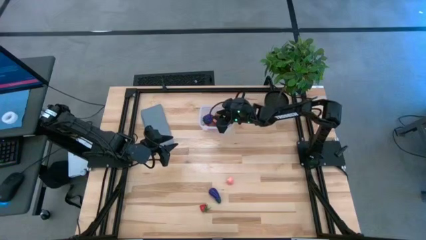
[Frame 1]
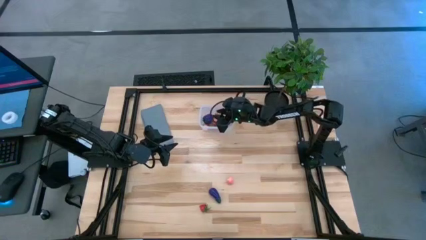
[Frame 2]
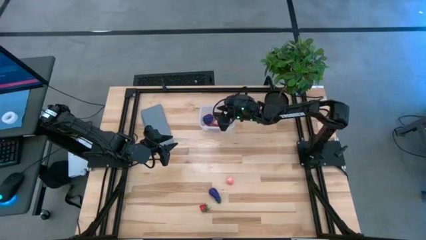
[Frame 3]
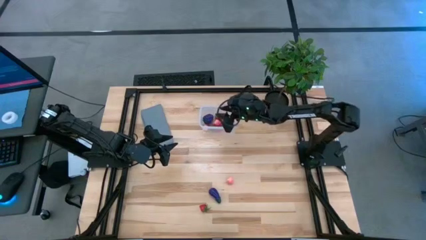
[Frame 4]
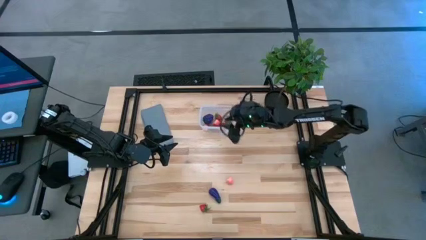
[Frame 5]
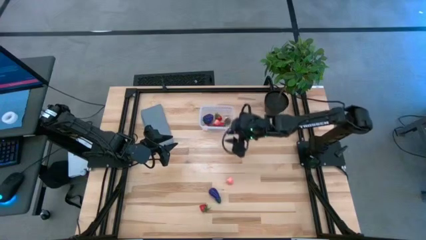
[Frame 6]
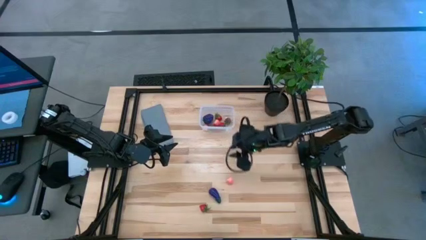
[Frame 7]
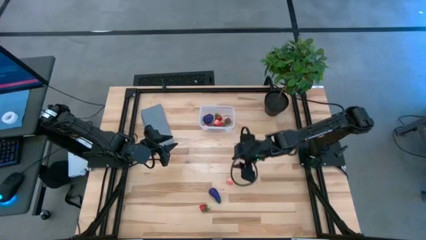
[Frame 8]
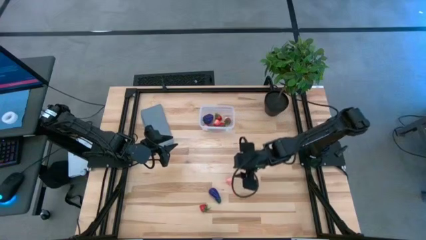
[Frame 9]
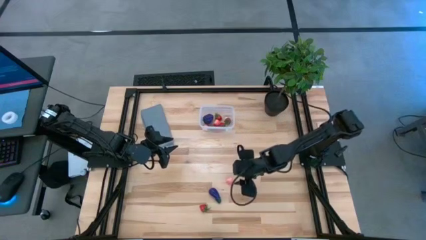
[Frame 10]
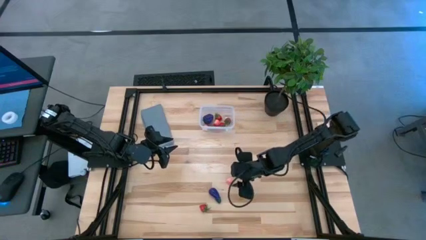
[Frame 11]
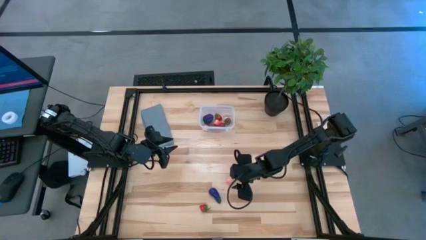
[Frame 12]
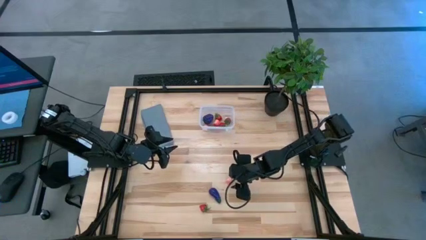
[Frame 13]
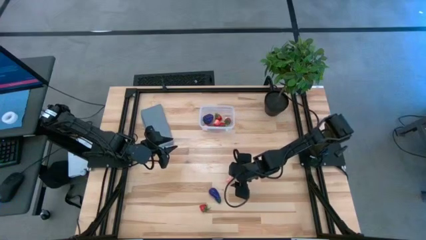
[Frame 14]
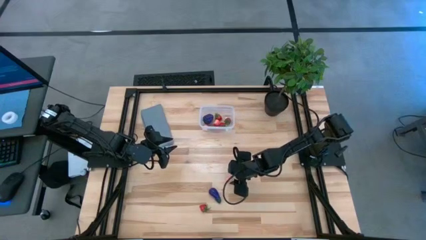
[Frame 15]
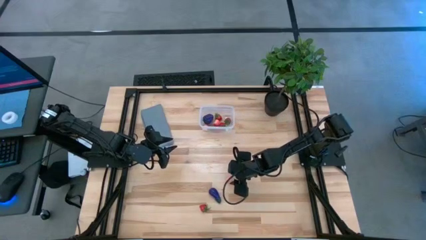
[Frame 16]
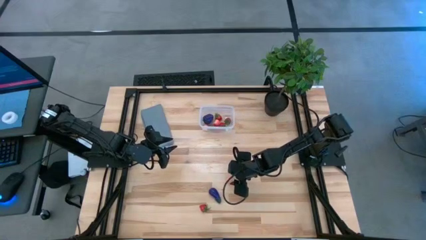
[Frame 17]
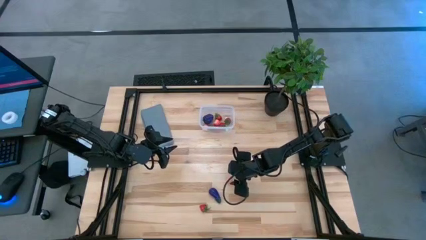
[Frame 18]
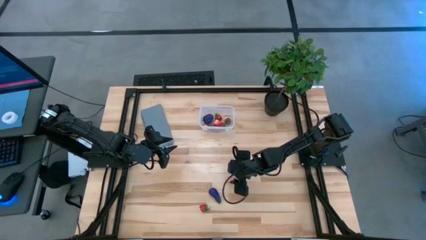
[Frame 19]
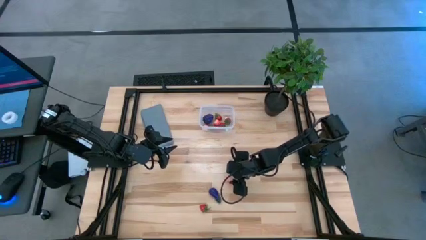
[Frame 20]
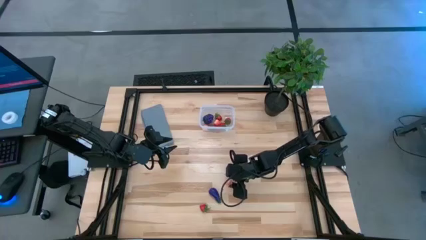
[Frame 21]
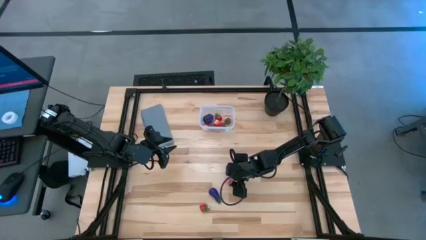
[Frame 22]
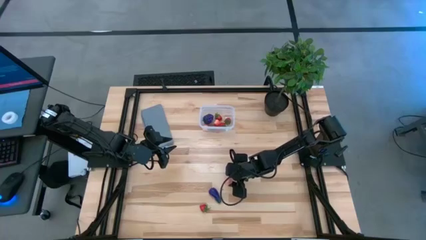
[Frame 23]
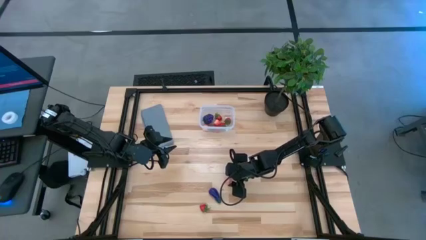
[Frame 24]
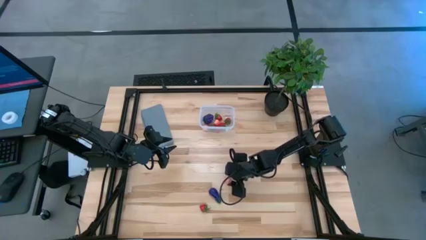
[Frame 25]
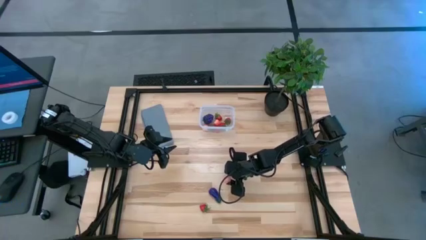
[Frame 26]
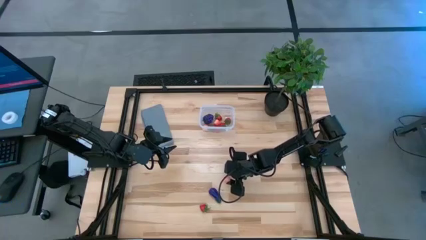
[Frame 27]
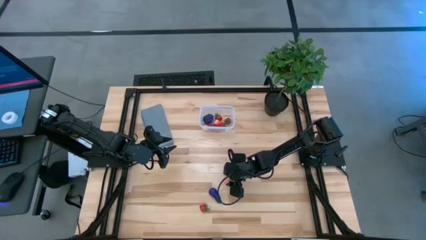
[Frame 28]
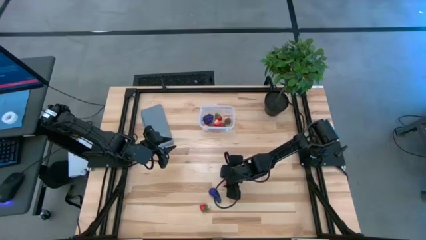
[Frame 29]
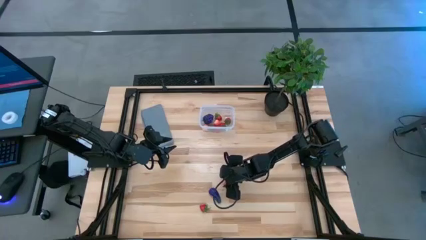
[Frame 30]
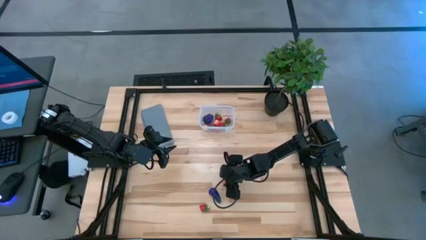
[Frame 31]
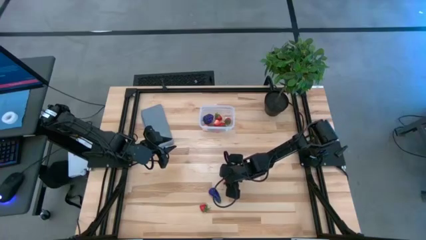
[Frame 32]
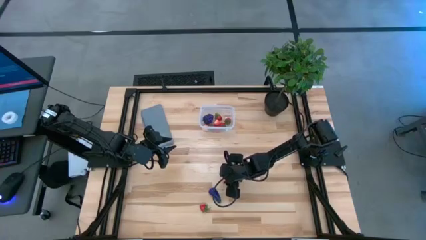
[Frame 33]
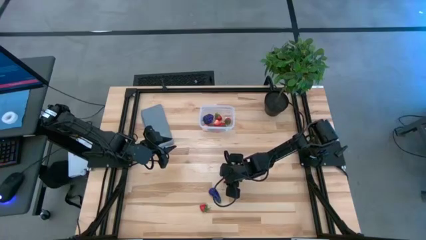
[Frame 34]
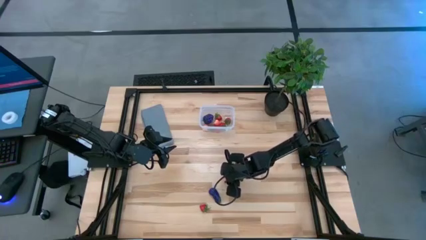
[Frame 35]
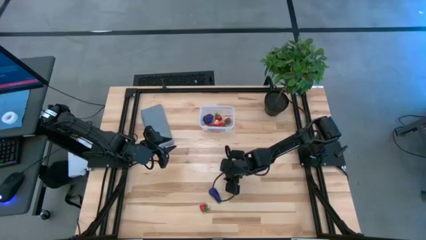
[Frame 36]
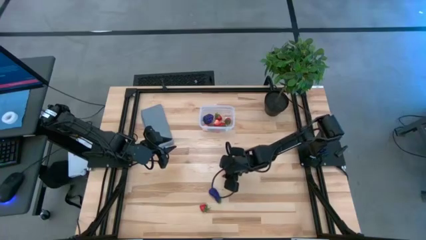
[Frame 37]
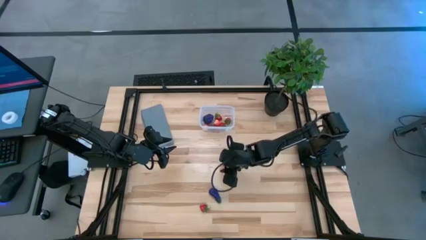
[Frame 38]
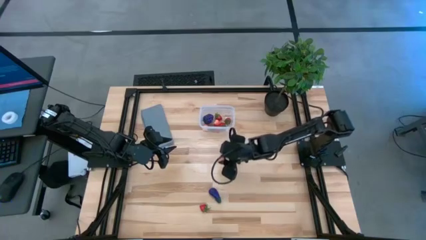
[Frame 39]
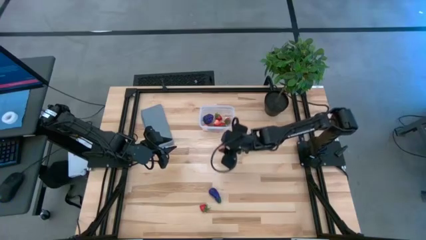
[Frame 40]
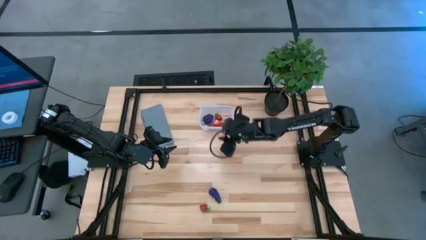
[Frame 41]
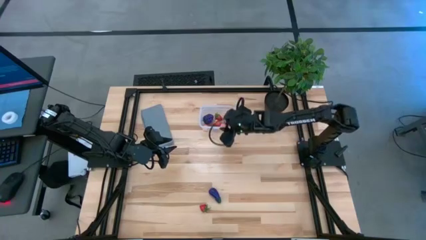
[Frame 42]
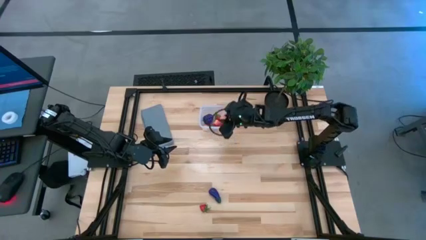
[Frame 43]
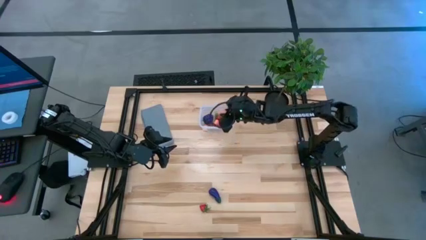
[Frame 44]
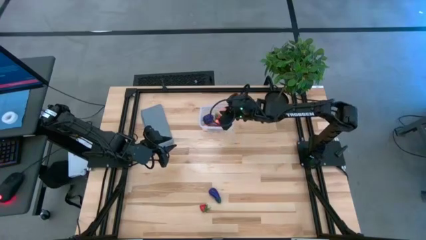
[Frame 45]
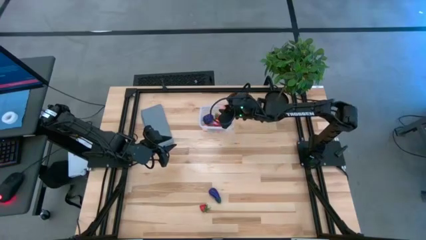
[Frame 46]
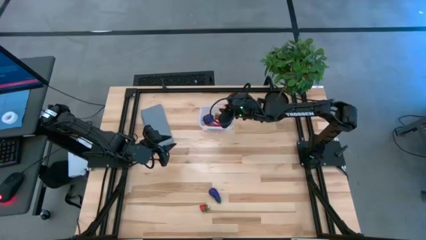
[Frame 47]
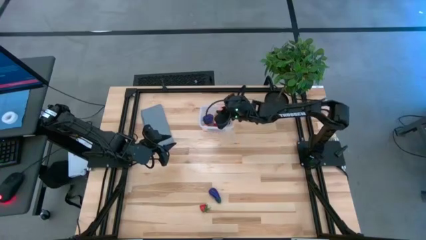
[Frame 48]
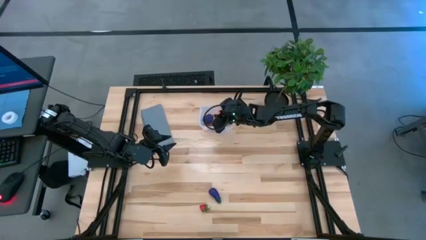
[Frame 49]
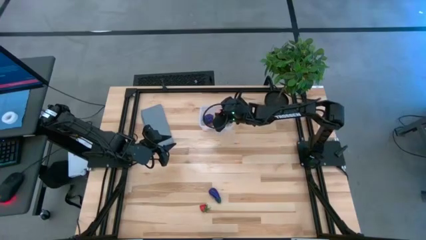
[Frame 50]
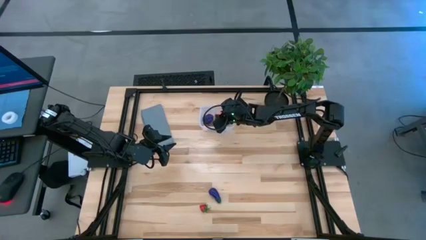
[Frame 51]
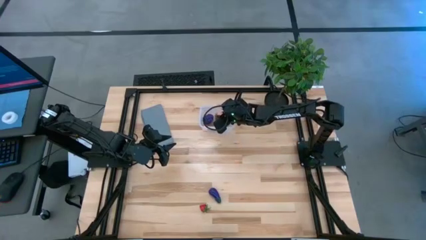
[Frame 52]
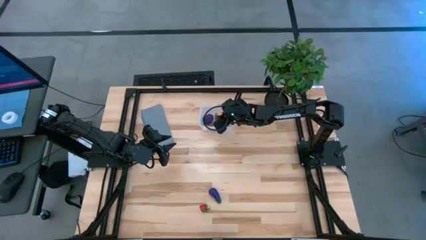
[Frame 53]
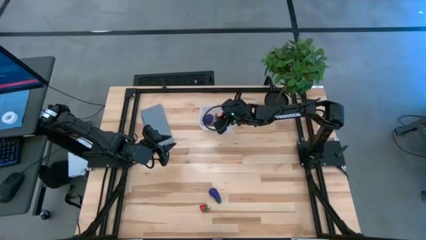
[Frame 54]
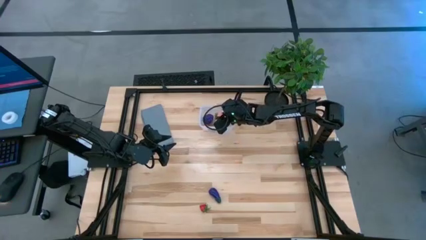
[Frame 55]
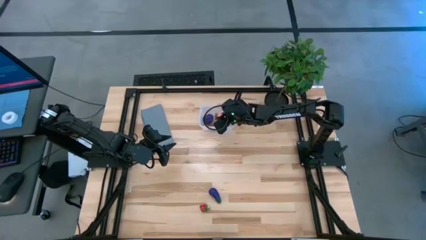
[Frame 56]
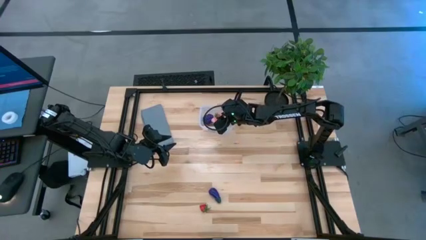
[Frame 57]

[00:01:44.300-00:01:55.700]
Task: Pick and placing Produce into tupperware
Put the peach into the transparent bin

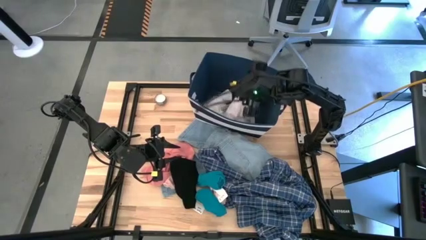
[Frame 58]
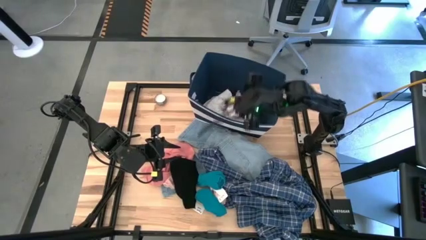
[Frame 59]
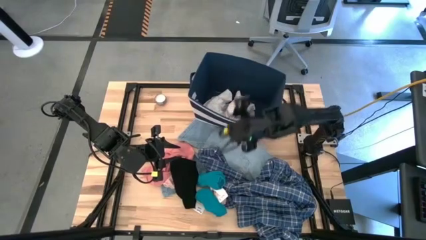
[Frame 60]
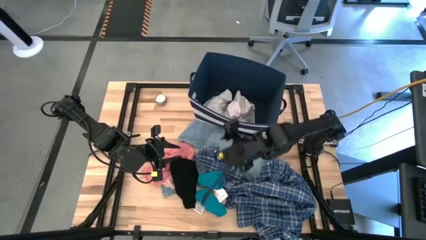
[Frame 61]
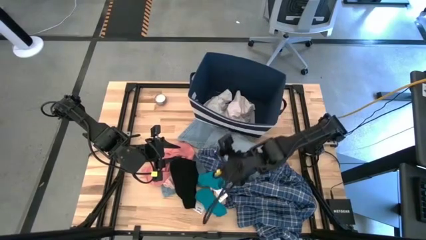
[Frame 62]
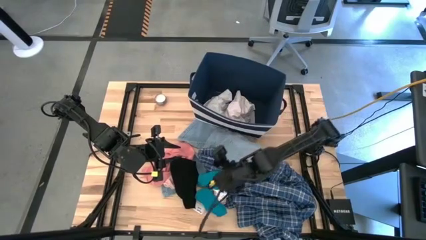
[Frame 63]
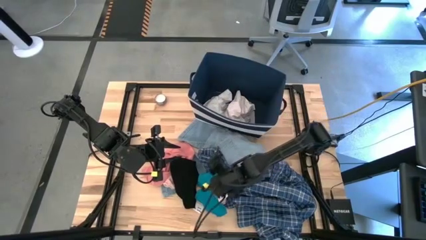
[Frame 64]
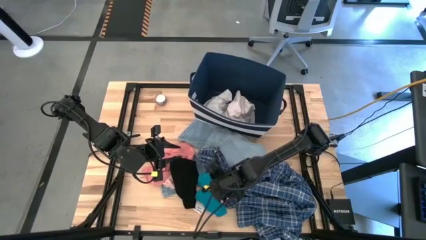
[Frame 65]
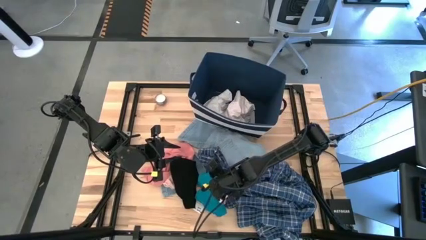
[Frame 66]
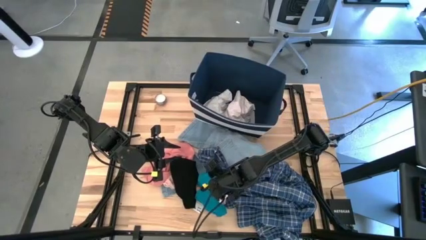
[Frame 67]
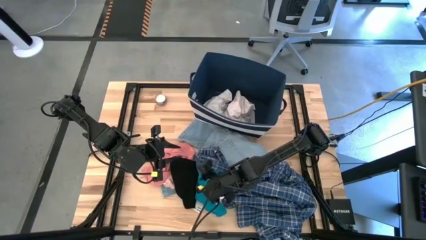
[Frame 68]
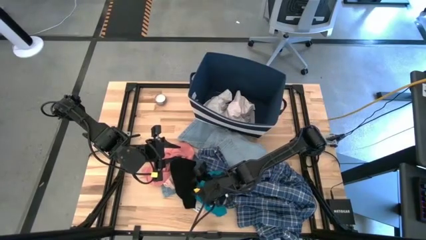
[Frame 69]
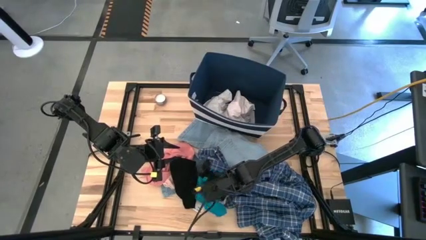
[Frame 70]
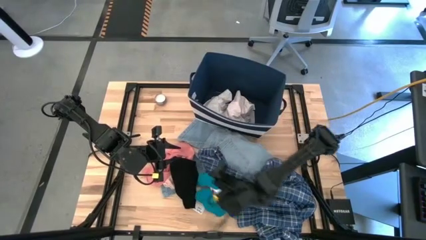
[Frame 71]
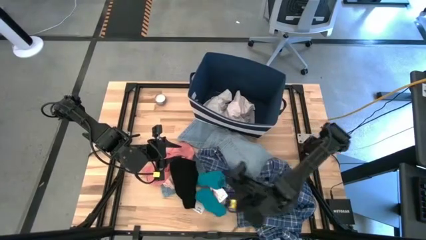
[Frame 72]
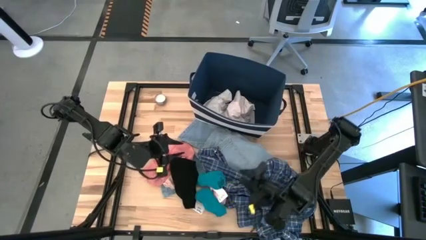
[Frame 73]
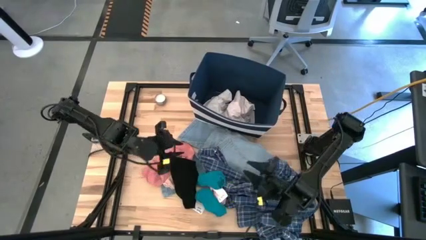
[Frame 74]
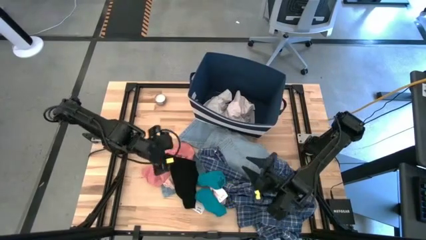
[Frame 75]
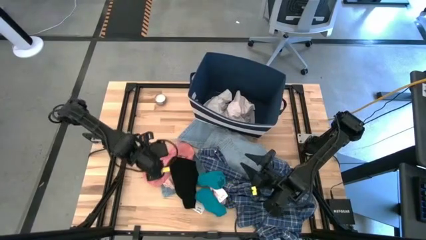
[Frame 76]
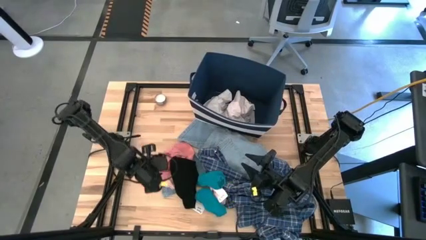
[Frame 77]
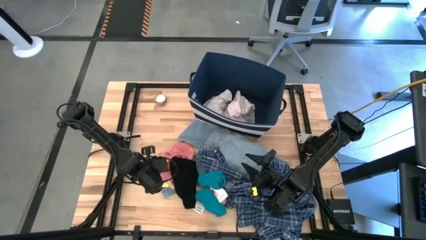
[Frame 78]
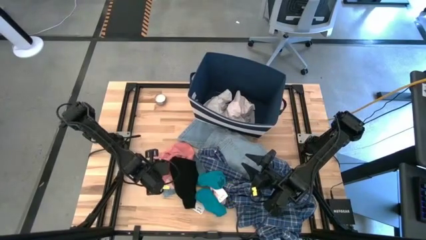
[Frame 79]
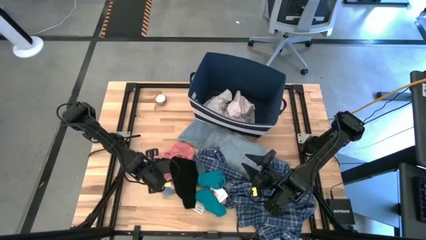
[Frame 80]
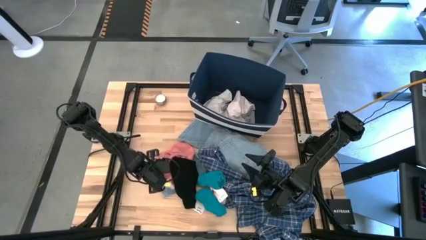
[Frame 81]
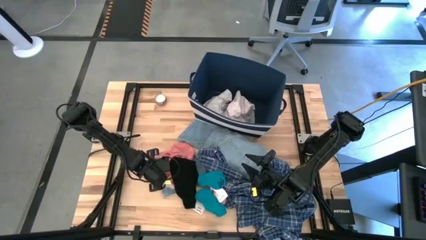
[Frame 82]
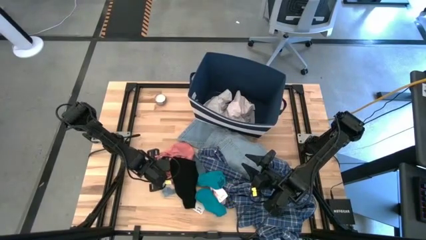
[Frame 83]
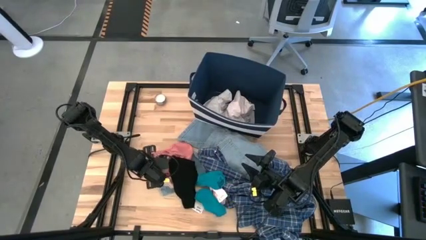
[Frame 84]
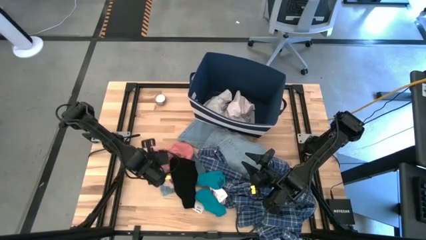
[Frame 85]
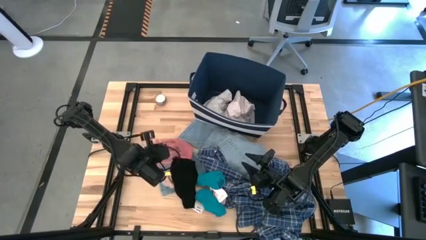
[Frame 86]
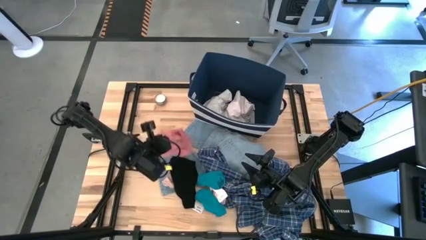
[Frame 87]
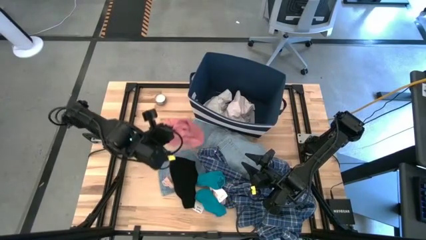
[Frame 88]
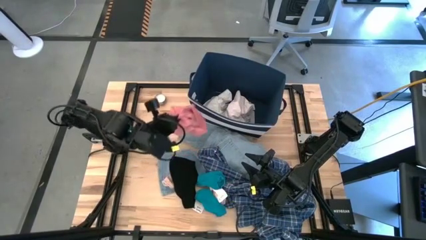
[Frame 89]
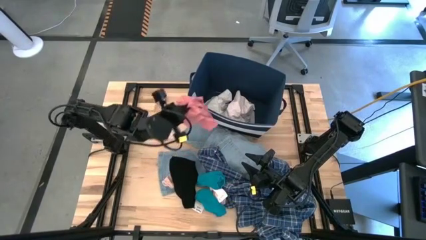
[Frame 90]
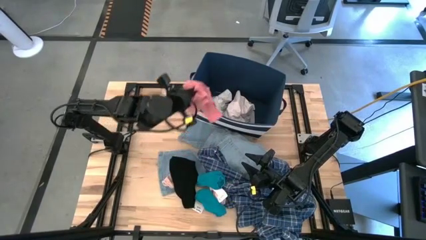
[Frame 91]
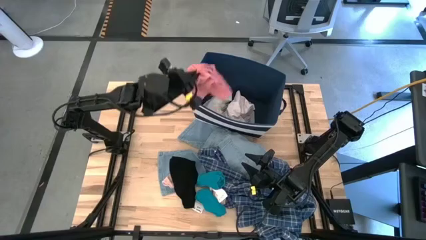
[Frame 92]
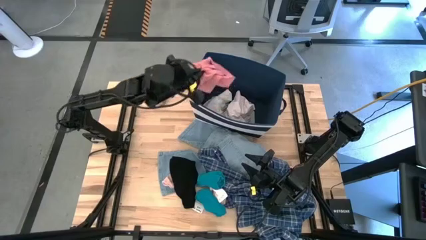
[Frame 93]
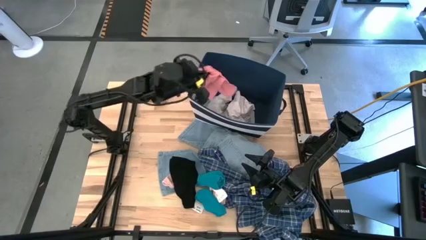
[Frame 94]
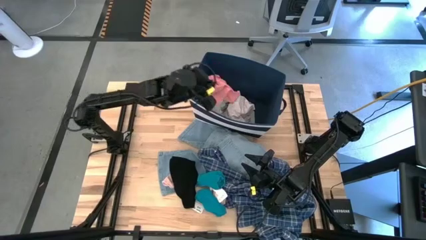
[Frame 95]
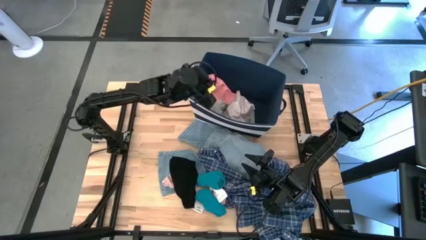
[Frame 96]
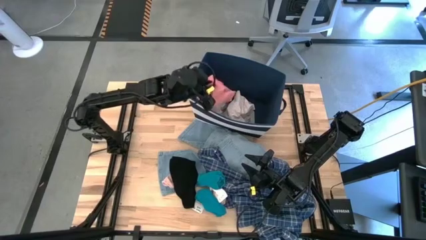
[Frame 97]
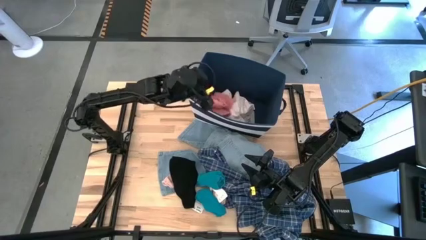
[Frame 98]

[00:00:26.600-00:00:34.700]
Task: Sort clothes
Put the pink underwear into the blue laundry bin
